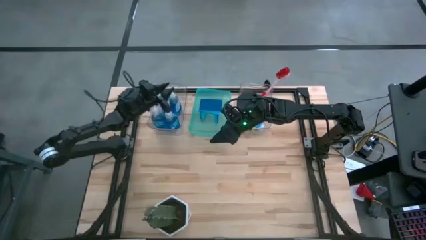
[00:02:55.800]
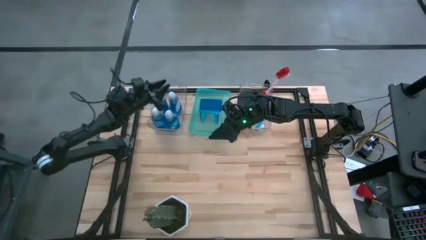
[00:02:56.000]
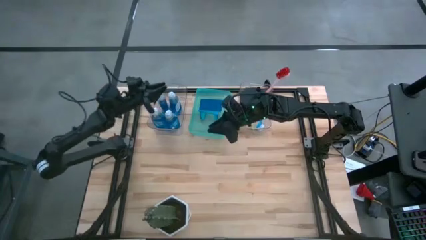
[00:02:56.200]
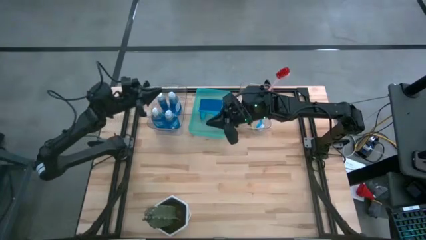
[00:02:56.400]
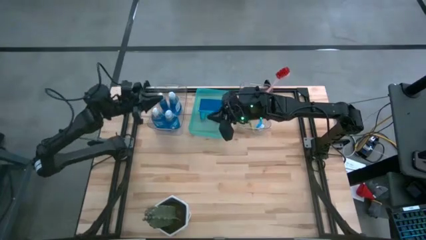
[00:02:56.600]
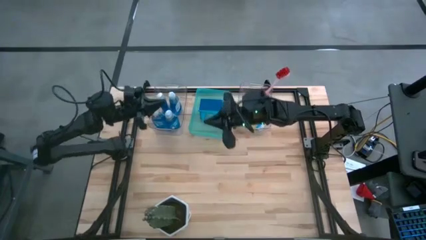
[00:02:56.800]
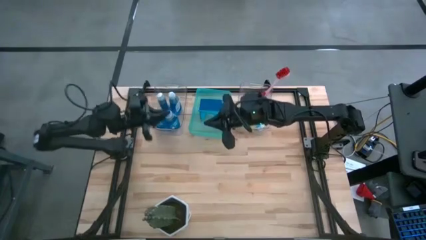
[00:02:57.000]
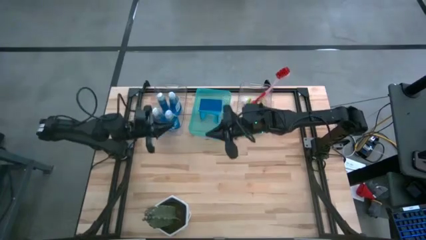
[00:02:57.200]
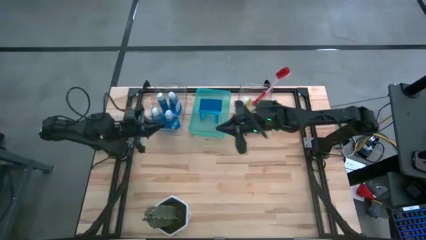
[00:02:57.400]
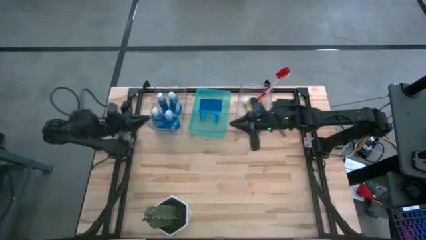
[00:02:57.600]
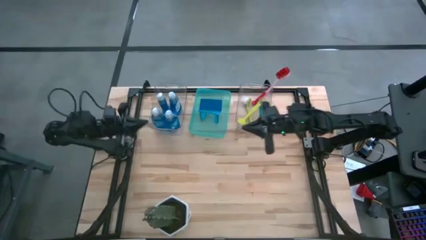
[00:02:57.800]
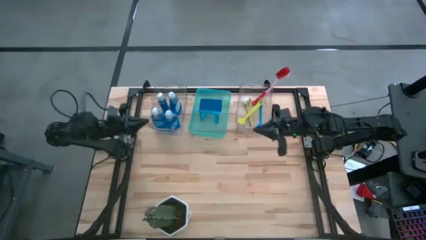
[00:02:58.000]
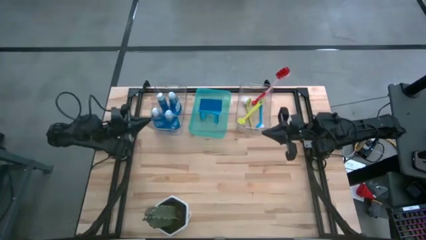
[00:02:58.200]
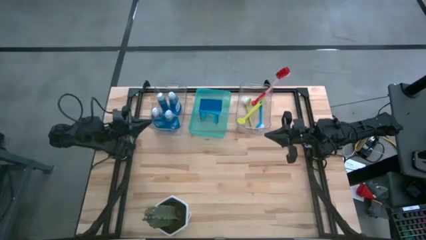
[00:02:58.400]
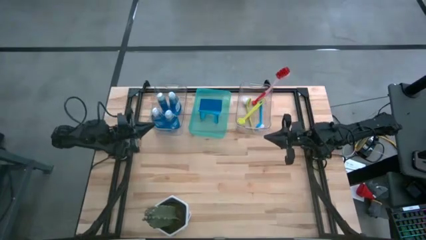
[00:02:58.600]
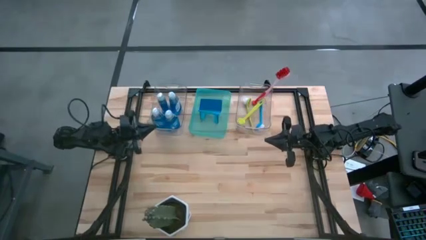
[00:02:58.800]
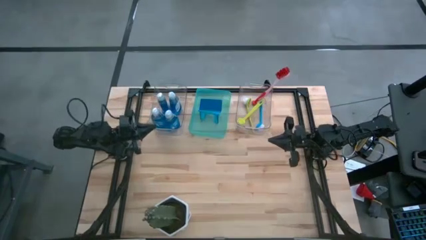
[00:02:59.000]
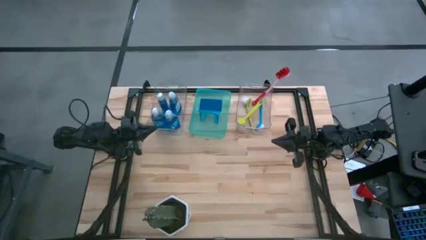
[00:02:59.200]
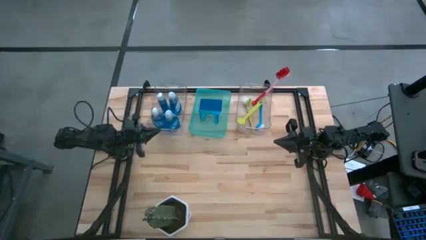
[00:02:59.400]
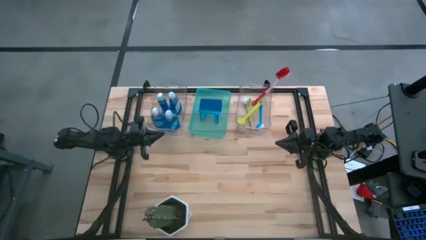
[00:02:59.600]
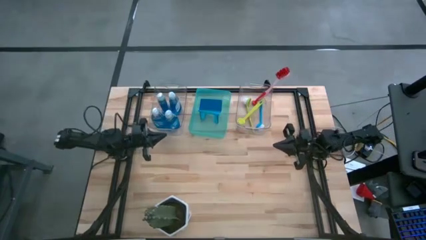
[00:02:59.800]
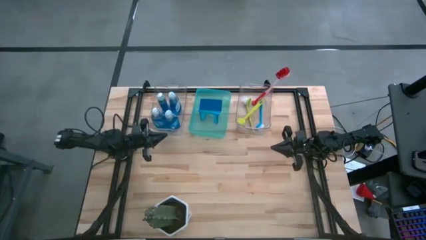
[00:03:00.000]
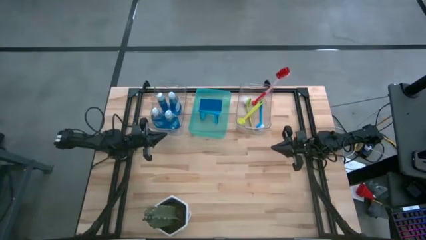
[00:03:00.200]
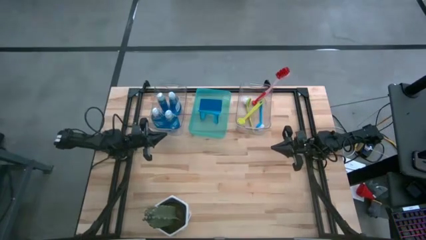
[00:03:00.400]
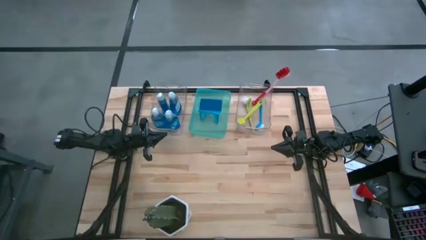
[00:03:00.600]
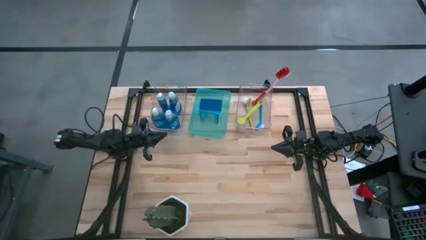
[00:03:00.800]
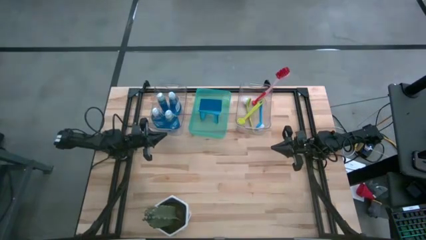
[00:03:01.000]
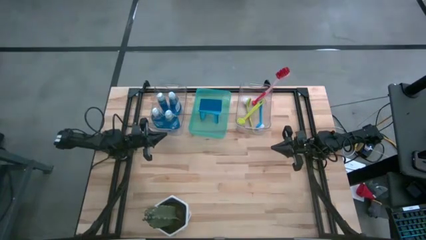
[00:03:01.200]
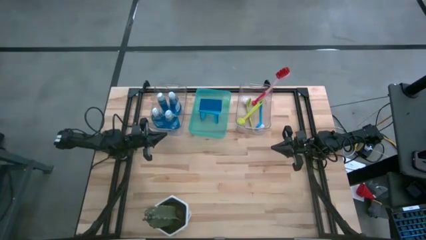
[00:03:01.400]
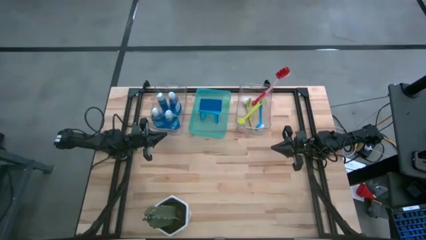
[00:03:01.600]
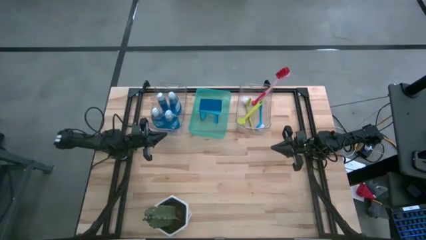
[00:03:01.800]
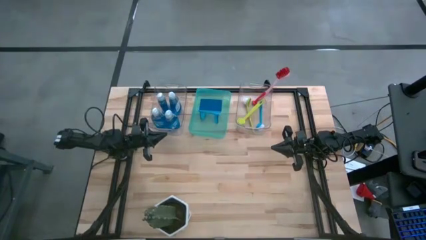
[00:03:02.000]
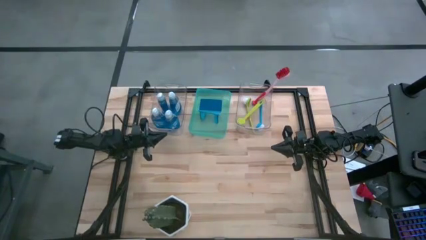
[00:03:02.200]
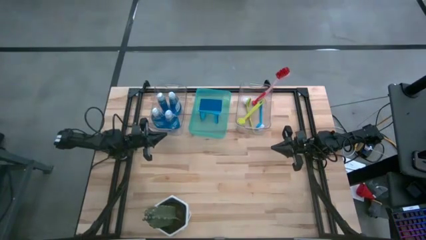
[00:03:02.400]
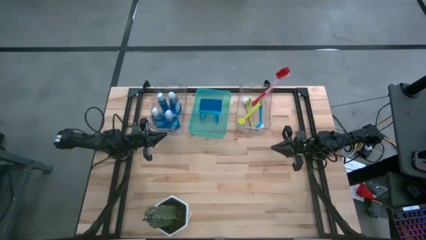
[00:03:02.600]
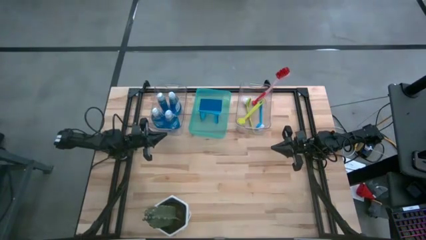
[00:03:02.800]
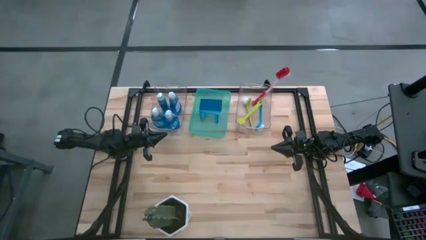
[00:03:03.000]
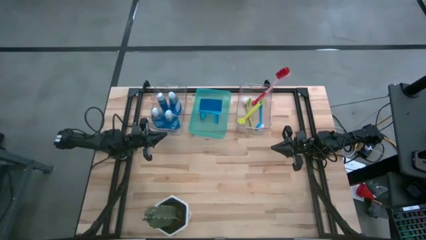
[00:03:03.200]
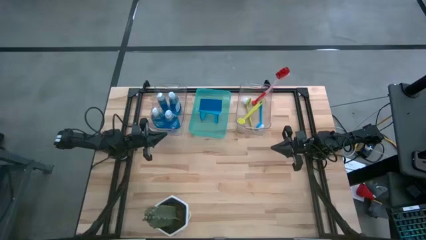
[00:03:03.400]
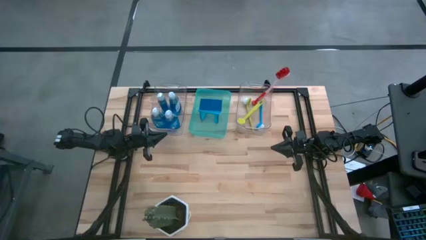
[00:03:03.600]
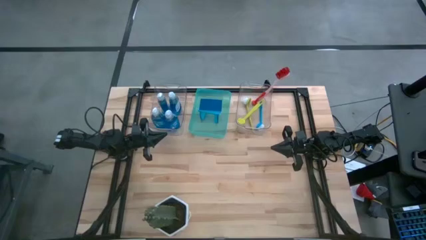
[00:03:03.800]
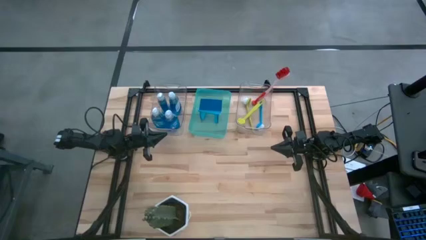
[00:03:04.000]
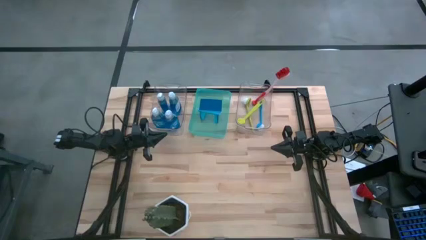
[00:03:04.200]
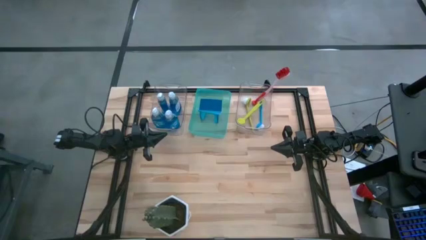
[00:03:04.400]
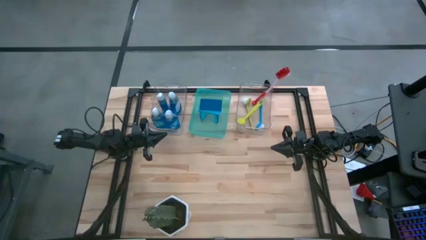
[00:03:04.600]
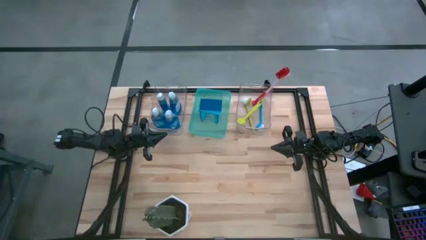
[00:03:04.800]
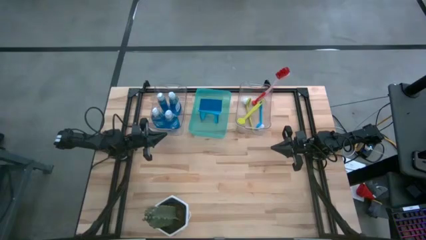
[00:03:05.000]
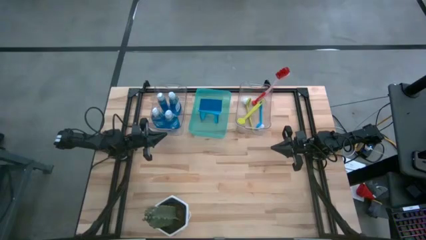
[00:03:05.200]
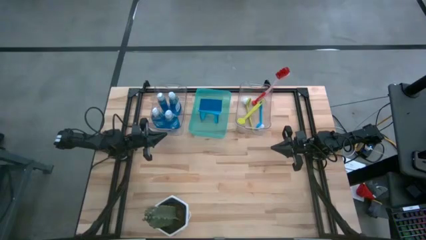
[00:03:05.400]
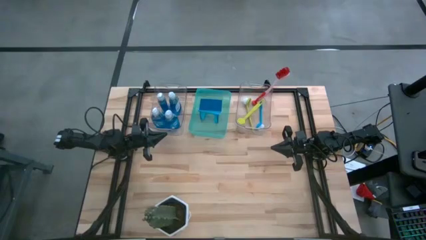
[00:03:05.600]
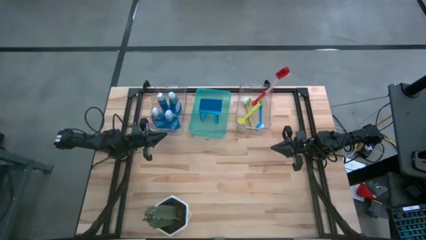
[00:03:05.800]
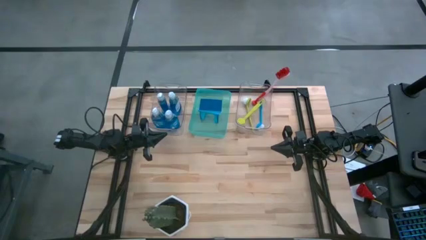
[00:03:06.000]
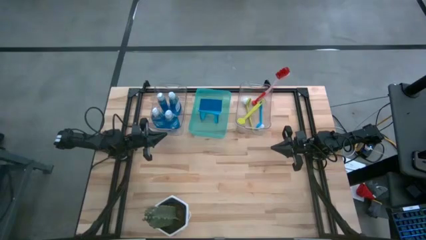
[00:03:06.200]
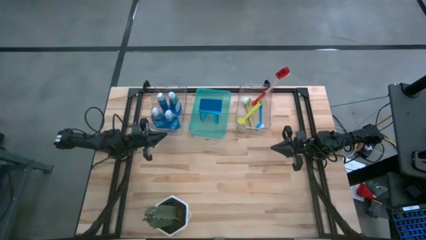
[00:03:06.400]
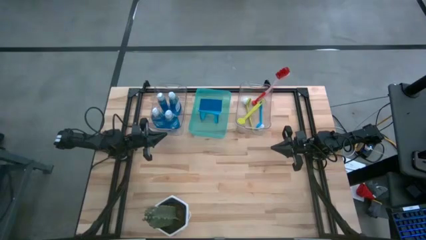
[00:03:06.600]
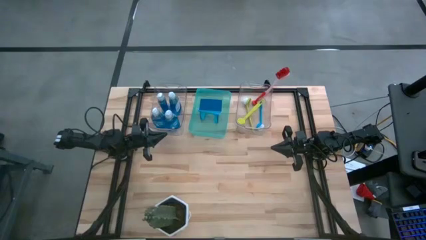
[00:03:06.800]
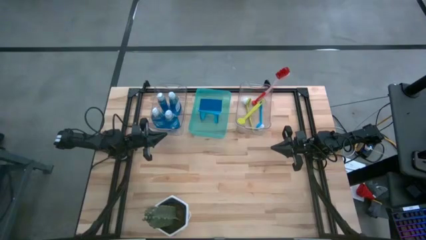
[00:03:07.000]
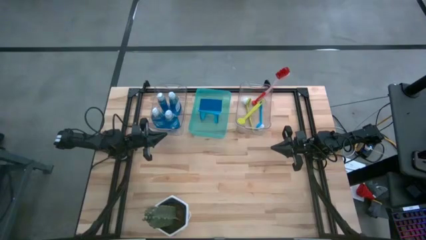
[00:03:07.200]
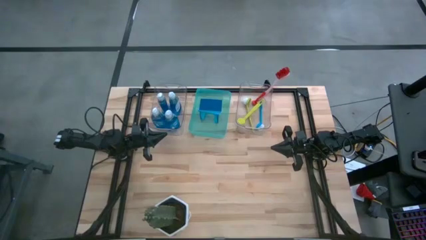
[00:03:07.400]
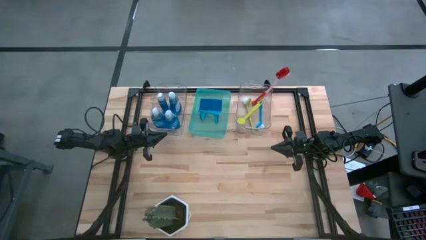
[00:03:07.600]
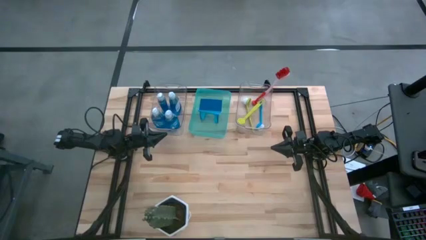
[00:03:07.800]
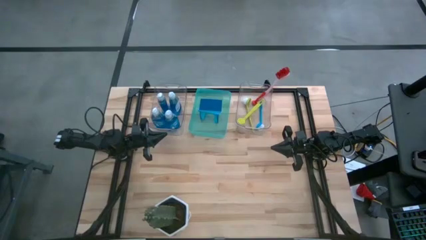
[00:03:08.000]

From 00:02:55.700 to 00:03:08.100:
Task: Pick & Place Kitchen Sink Supplies
Return to Home Position
